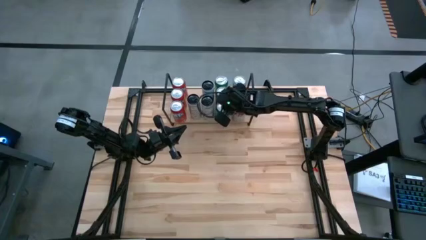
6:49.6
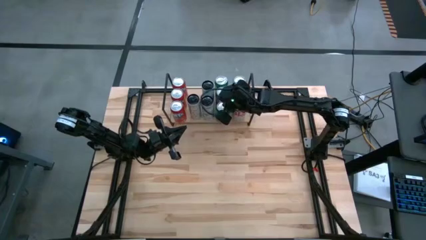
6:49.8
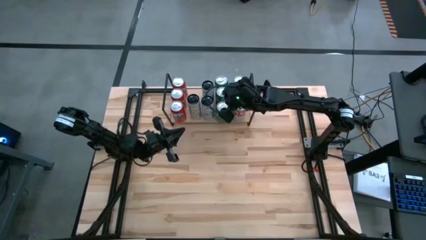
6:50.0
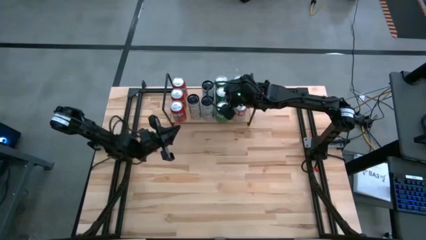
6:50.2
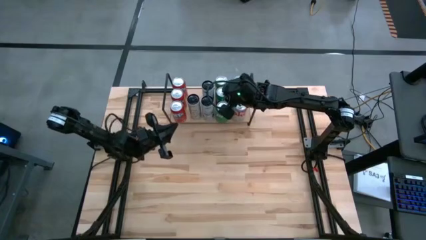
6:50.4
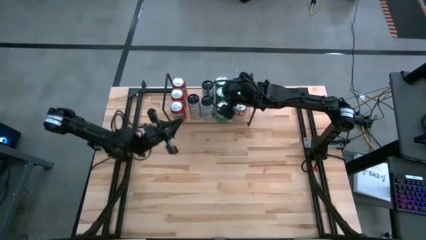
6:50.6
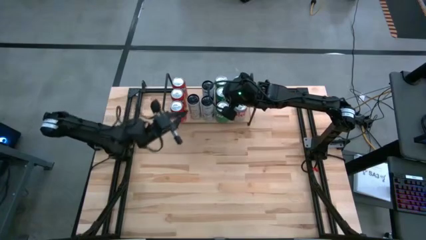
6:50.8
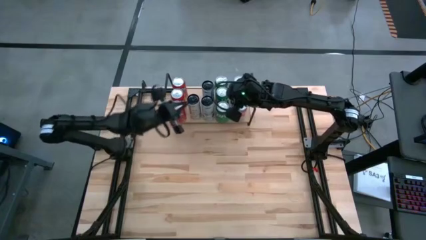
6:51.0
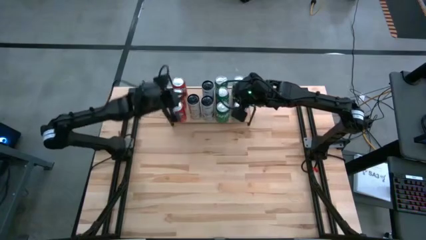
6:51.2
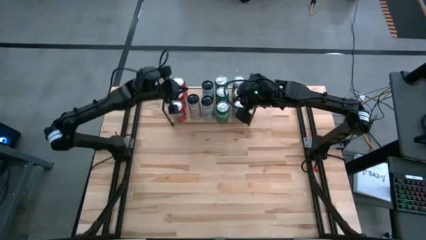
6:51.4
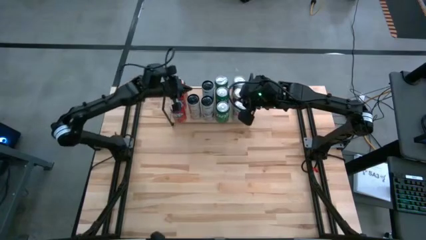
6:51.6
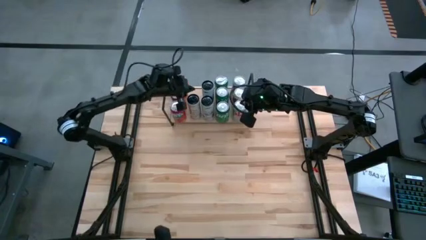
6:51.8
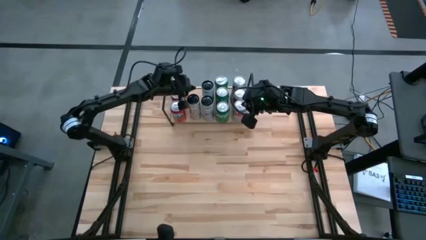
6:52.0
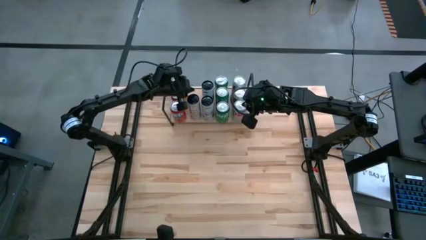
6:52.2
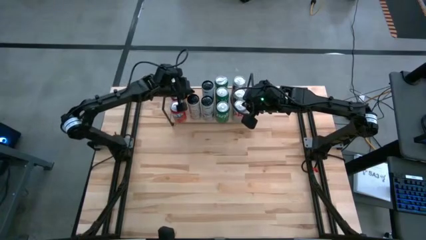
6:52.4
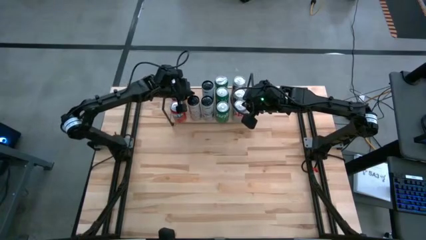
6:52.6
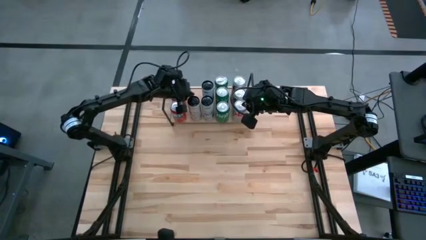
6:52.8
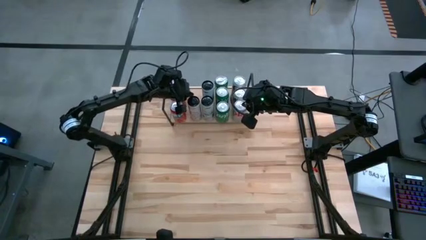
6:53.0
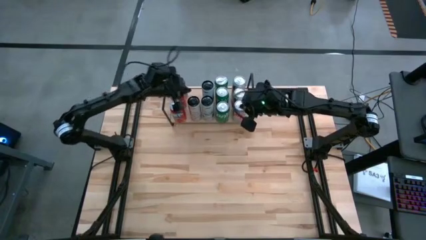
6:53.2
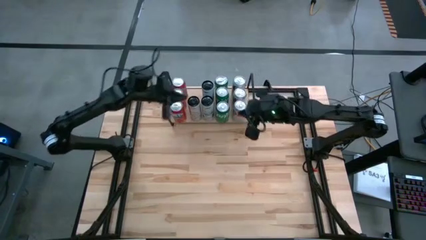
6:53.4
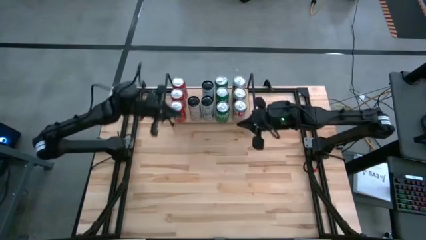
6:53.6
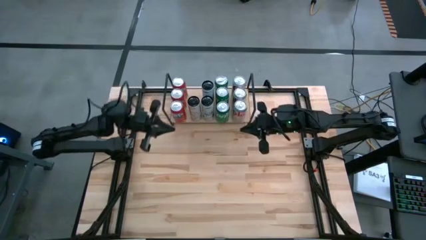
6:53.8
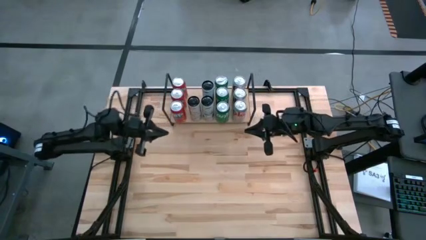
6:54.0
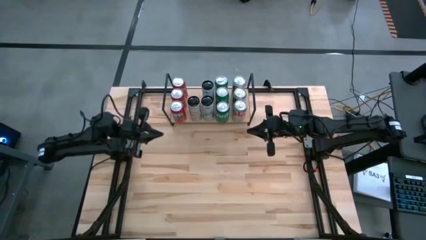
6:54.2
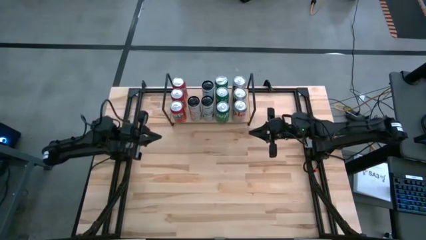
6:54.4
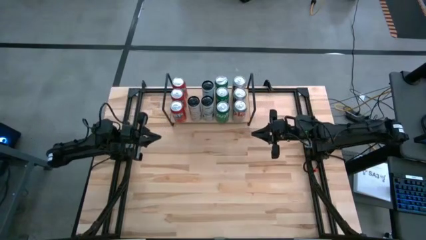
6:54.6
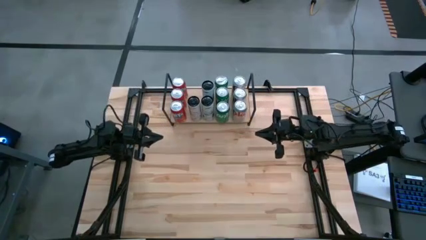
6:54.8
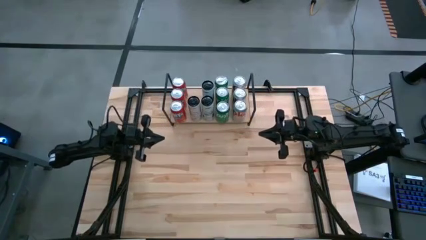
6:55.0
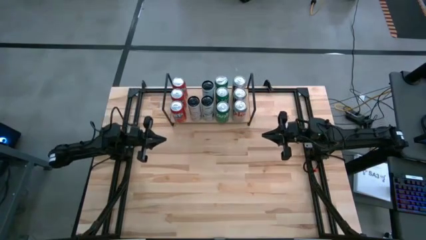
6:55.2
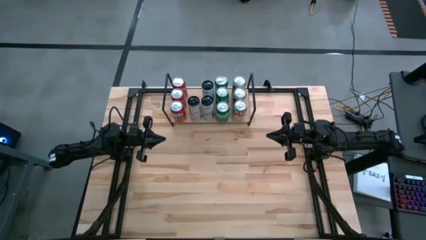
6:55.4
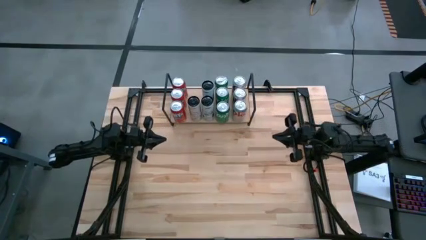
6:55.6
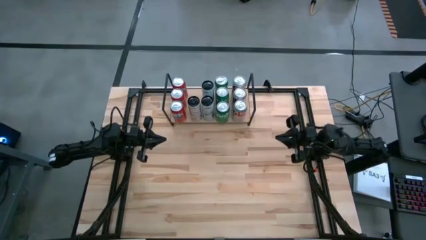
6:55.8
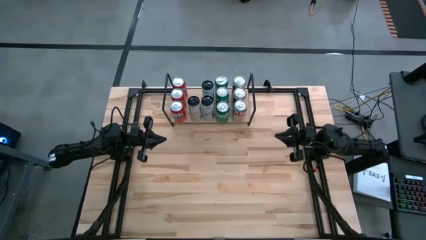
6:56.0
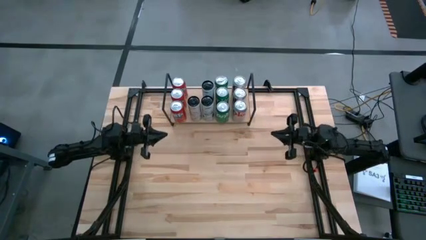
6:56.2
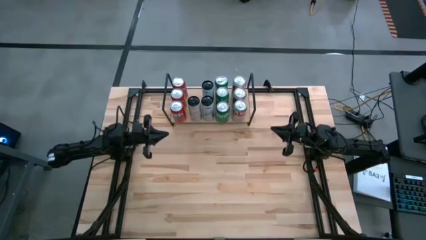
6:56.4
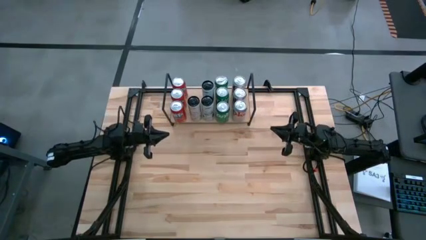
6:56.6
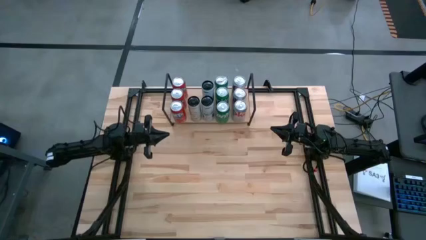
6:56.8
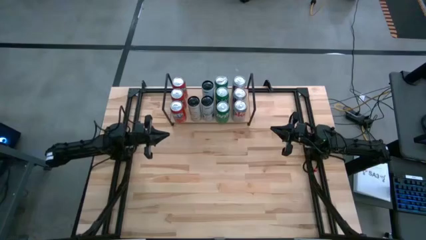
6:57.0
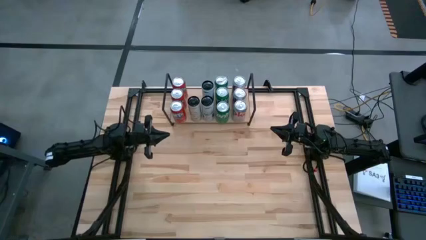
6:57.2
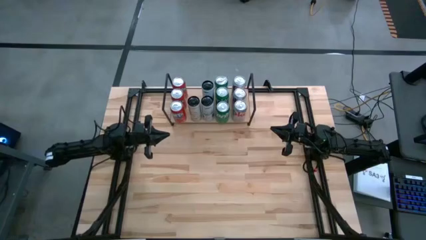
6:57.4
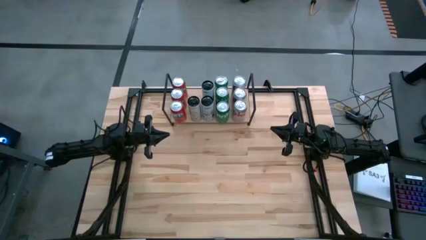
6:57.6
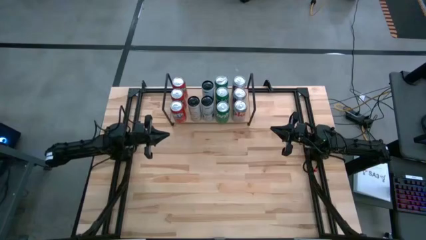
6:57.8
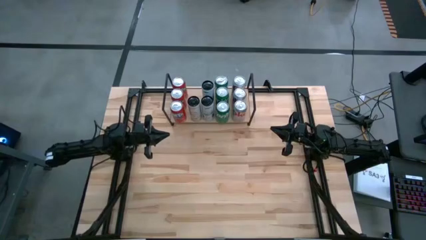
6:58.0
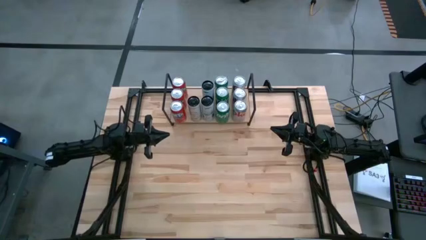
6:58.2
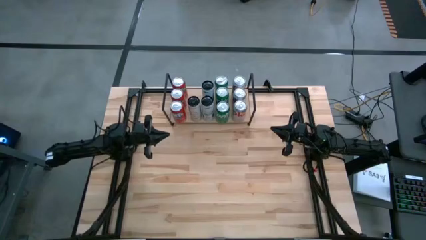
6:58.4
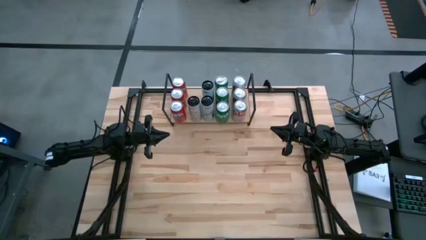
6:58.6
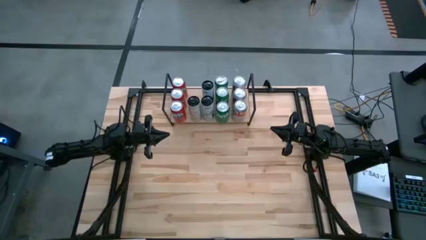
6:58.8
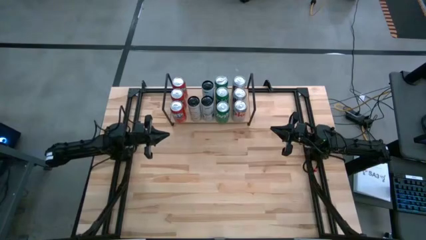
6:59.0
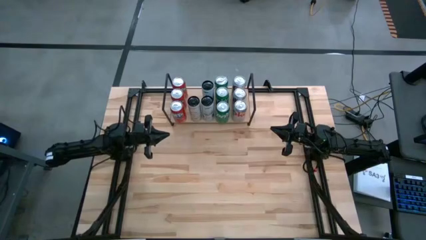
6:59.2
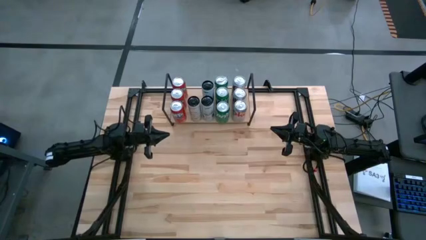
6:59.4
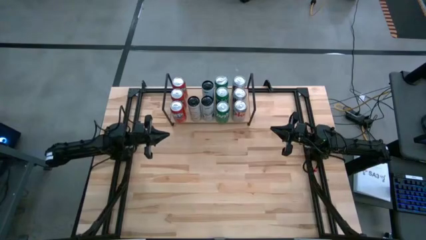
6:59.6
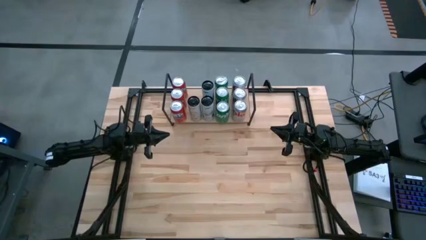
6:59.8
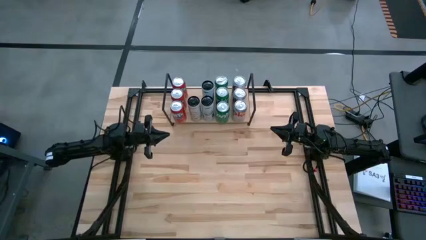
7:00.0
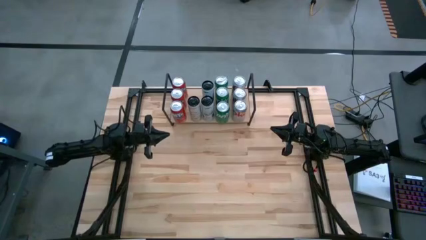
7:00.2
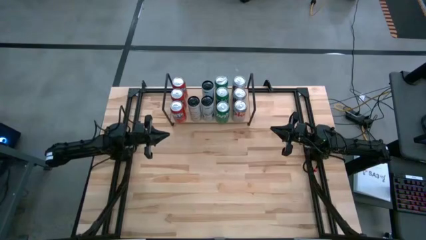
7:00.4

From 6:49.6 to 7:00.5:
Task: Sort soda cans
Return to Home Position

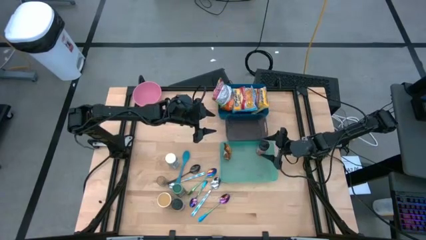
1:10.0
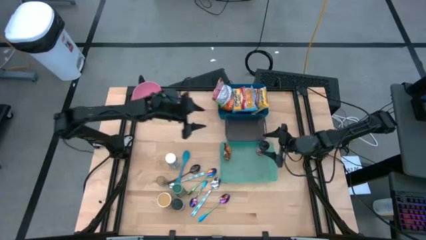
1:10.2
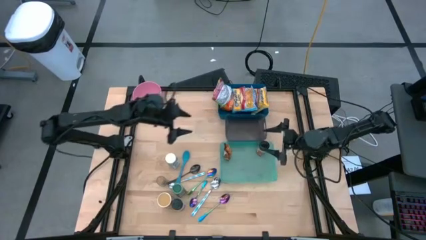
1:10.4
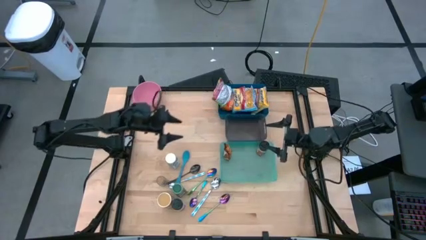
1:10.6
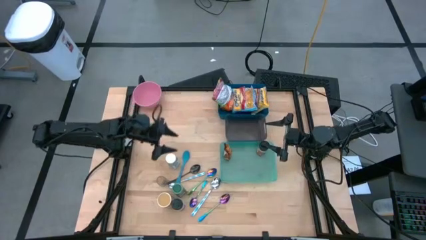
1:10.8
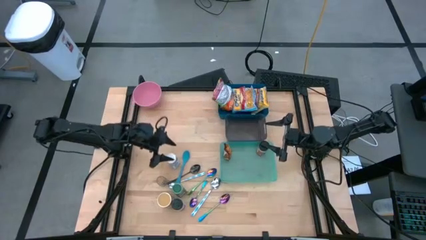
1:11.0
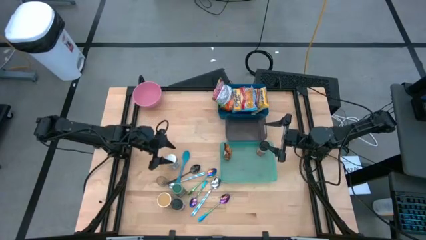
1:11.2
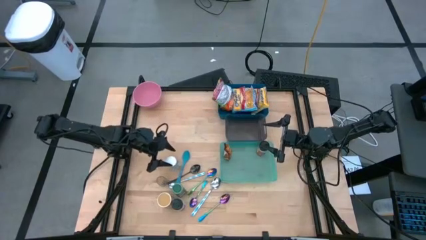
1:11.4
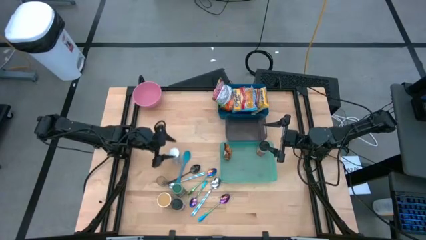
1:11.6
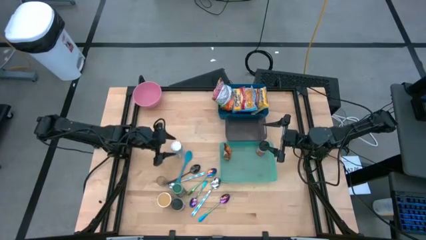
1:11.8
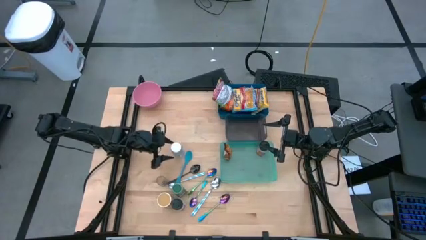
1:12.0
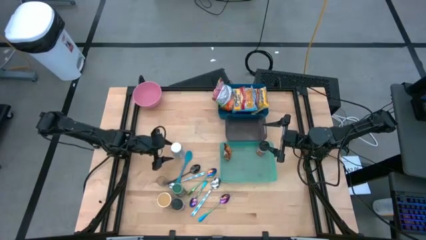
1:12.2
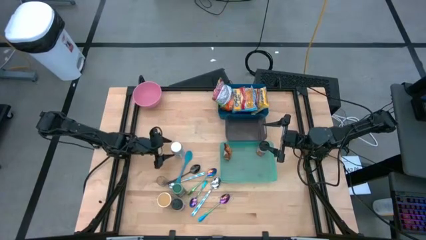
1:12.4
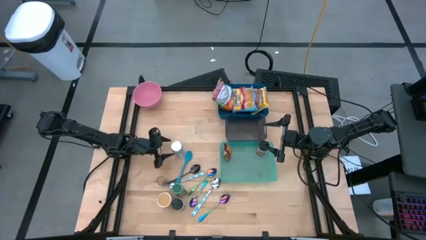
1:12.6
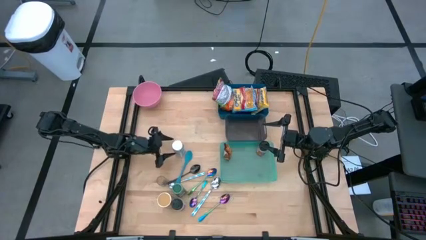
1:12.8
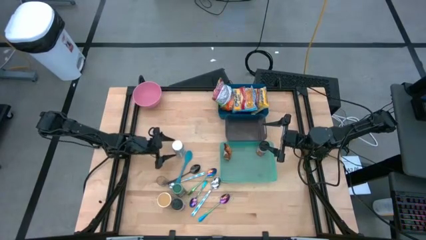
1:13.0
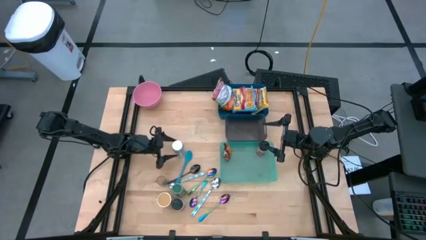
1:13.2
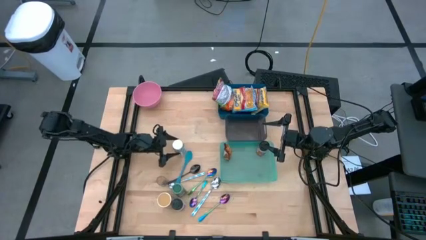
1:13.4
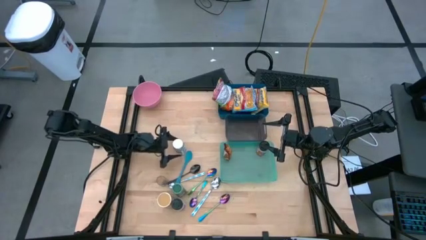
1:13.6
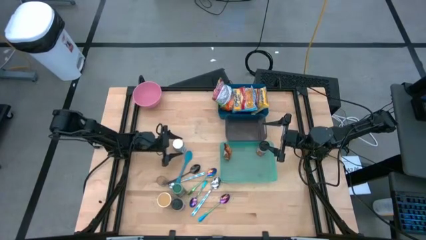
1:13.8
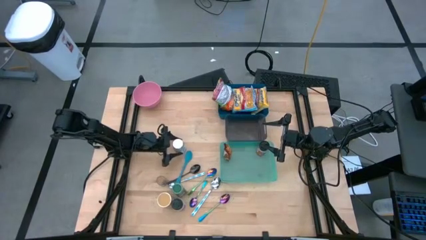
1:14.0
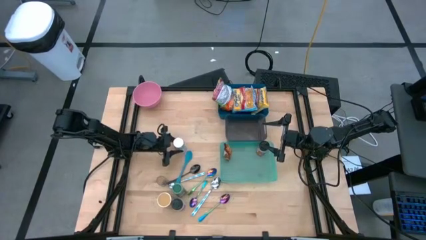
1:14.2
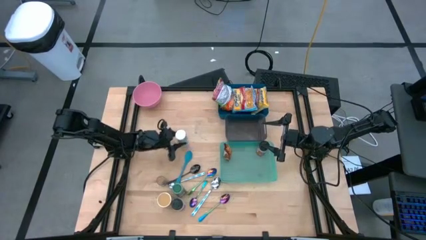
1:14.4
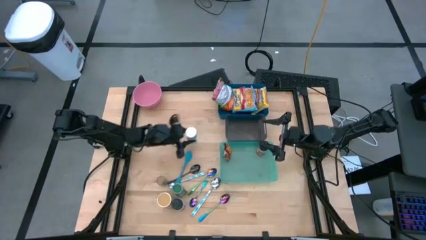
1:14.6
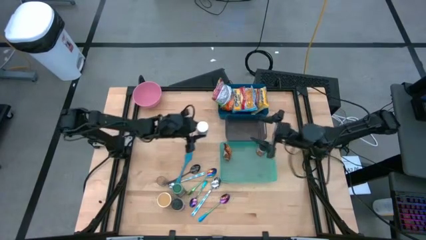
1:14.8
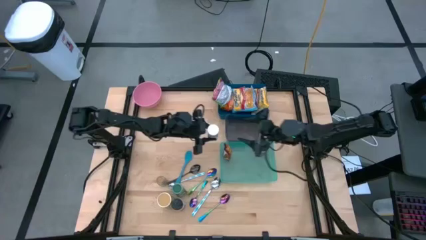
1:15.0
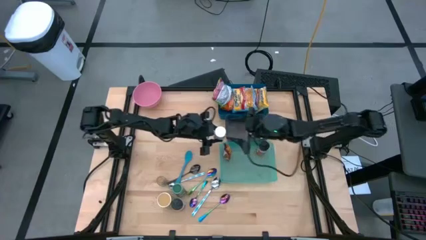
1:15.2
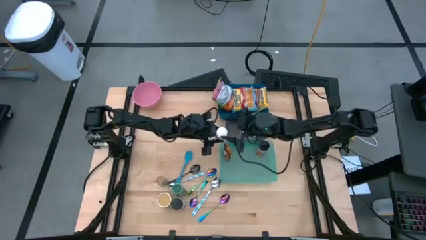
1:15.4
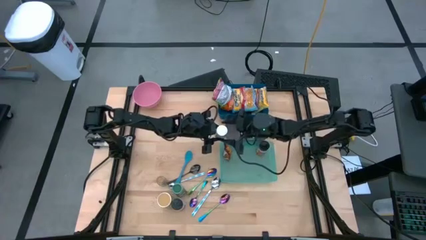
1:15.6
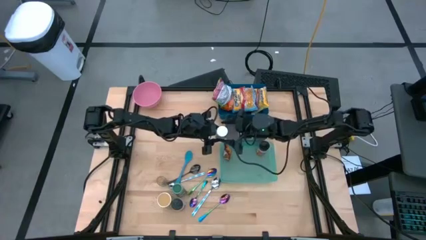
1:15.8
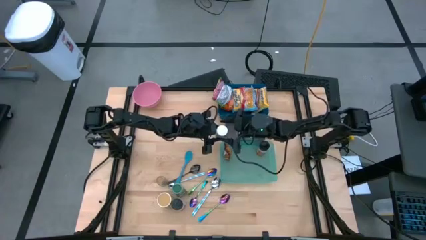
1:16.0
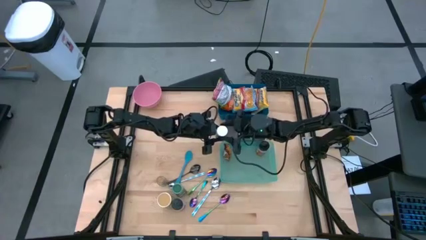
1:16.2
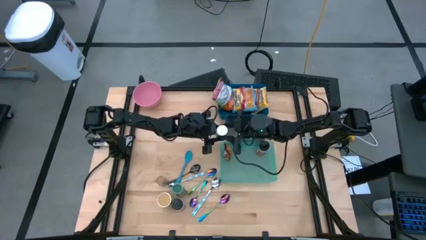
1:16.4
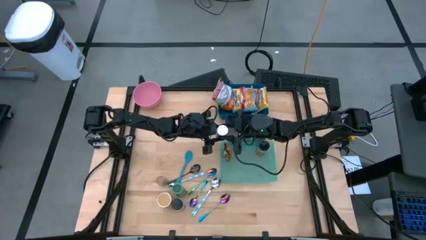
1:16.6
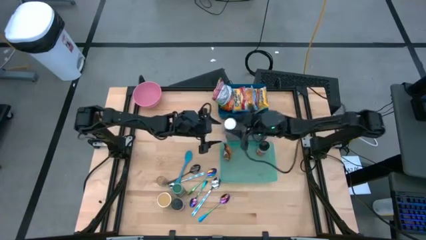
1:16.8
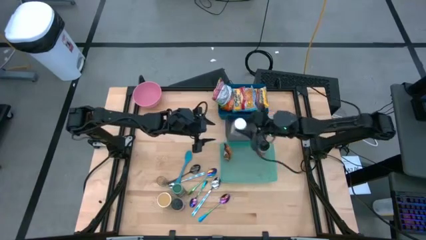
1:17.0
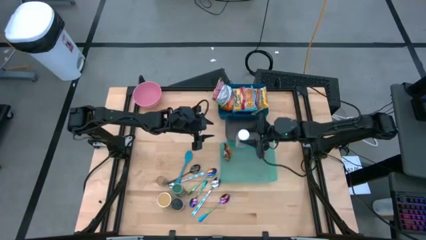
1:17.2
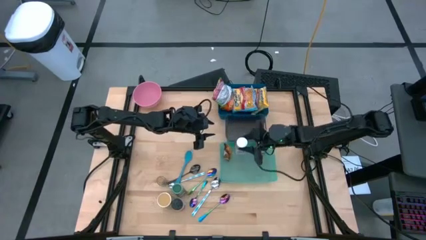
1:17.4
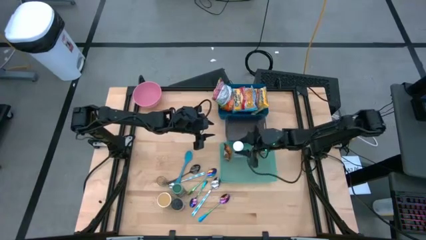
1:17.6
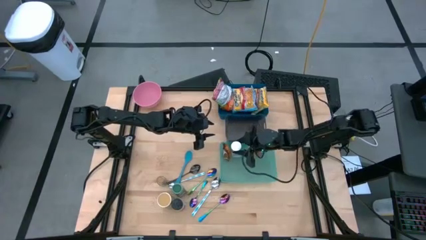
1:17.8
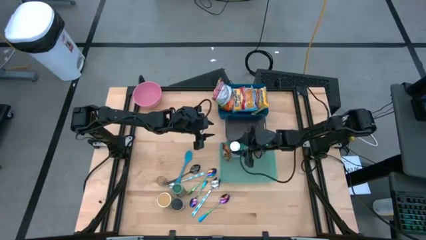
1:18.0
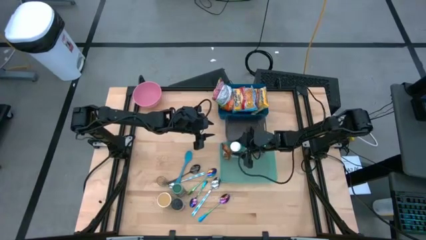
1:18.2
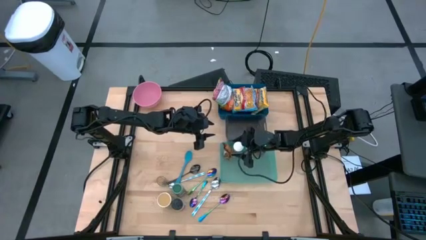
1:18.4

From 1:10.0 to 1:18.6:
Task: Pick & Place Food Item
Put the white seasoning bottle into the green bin
